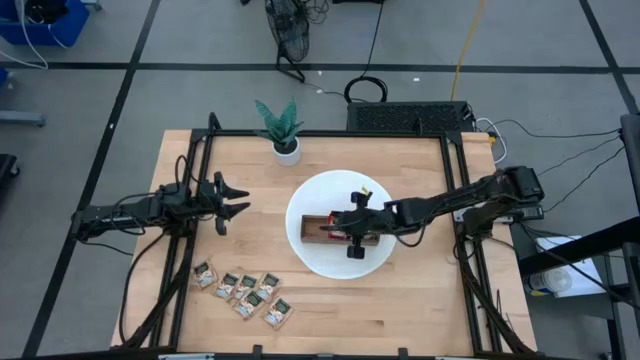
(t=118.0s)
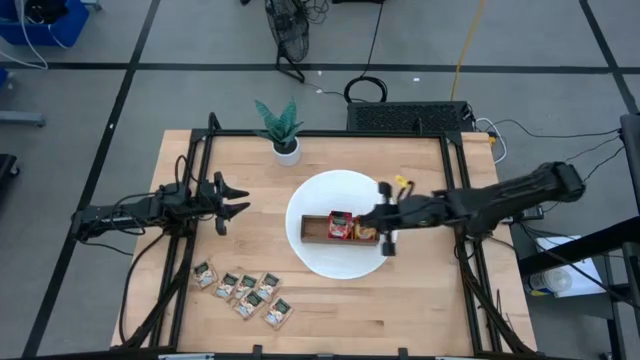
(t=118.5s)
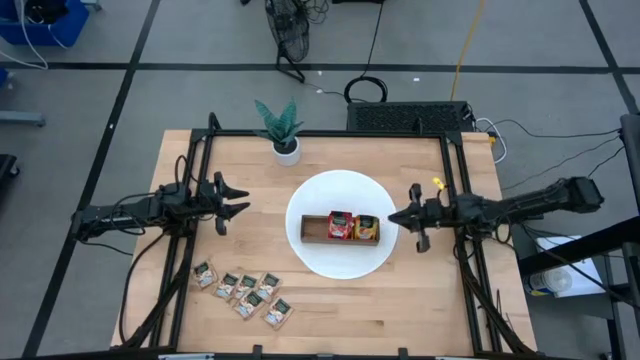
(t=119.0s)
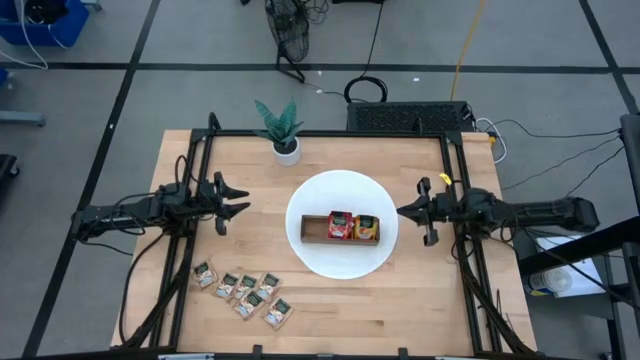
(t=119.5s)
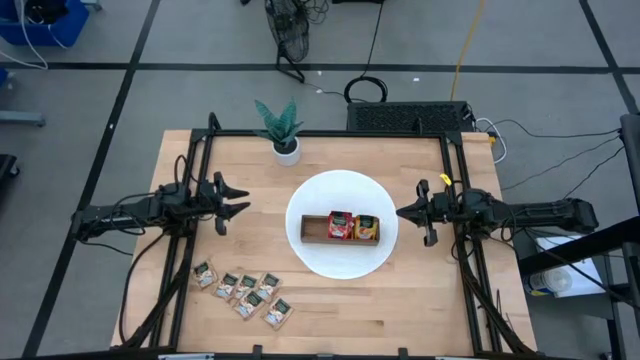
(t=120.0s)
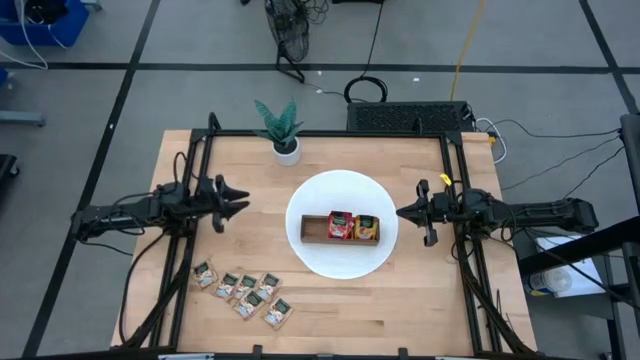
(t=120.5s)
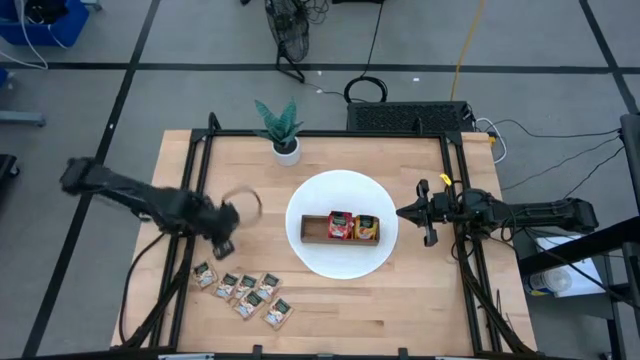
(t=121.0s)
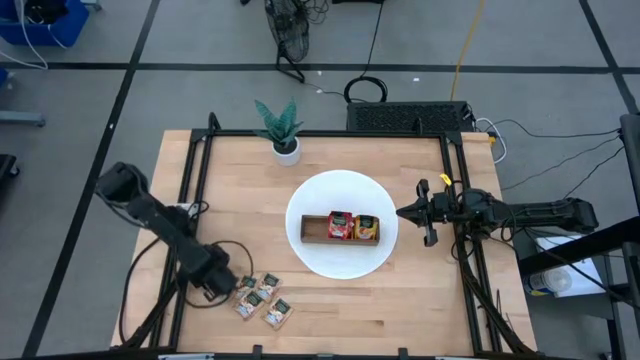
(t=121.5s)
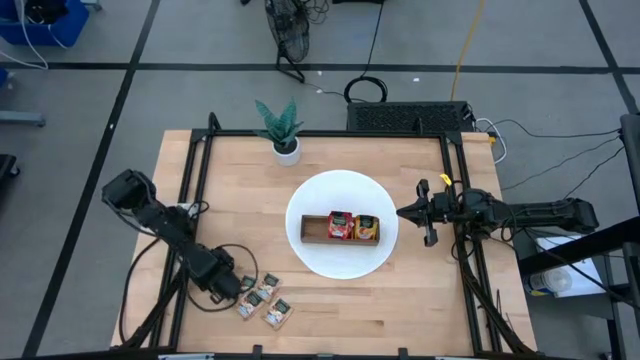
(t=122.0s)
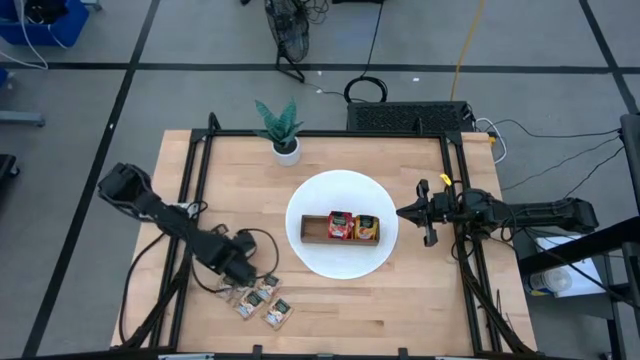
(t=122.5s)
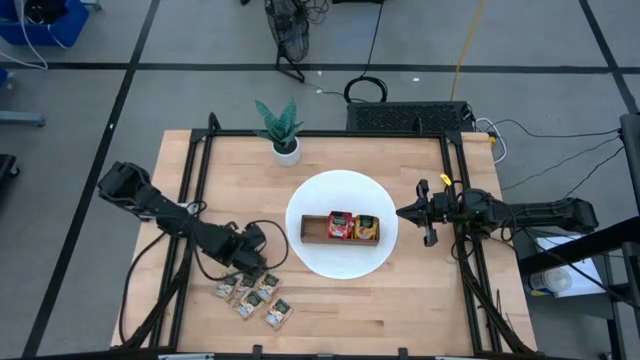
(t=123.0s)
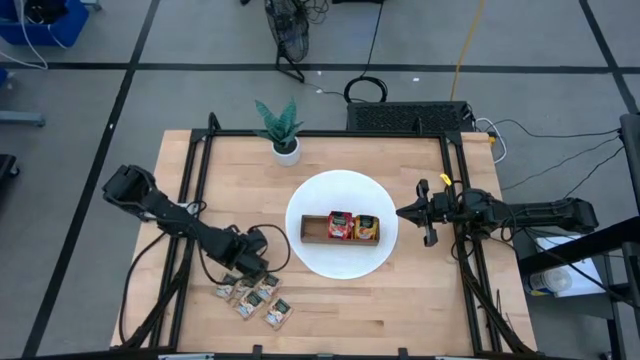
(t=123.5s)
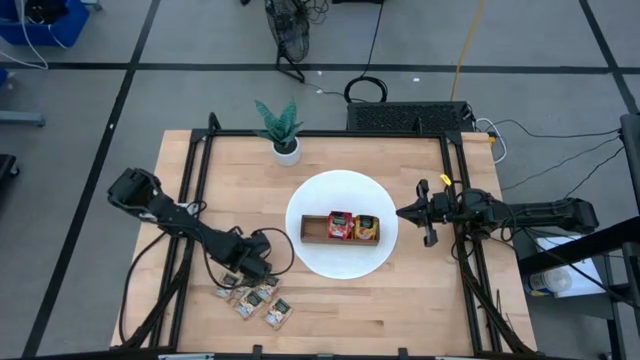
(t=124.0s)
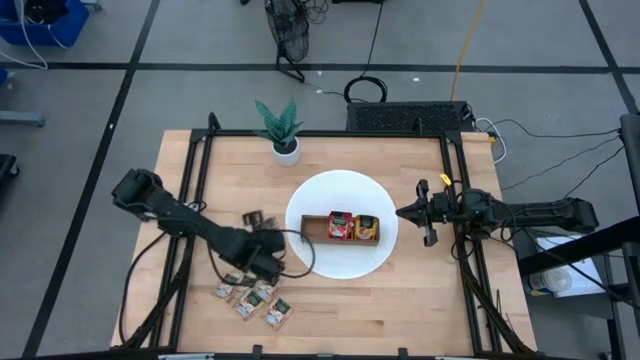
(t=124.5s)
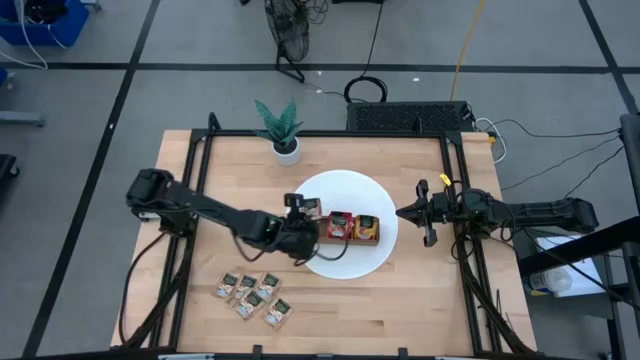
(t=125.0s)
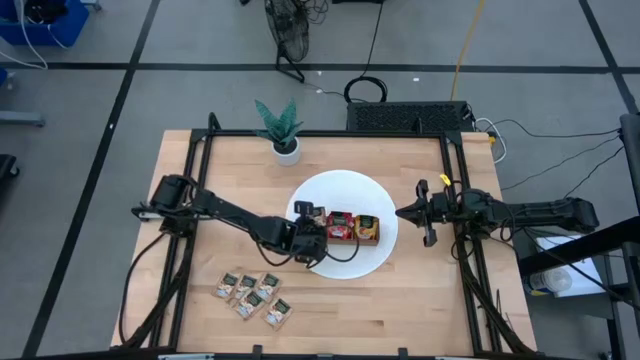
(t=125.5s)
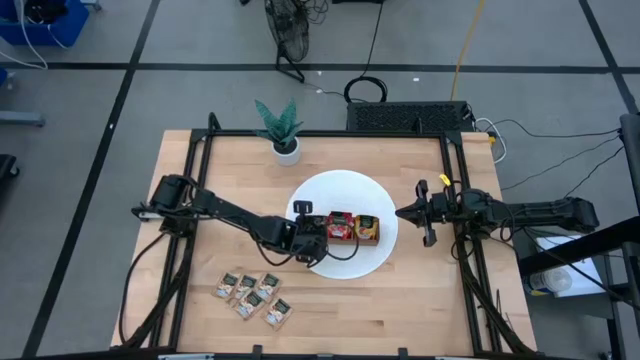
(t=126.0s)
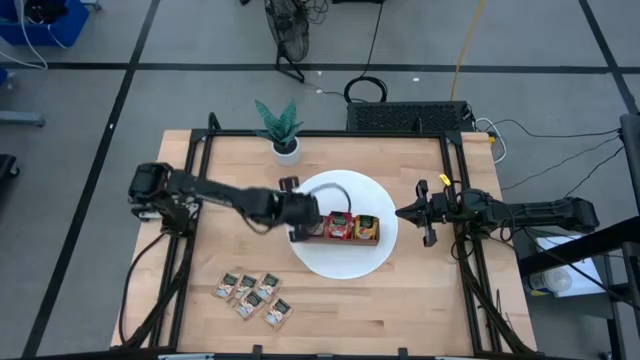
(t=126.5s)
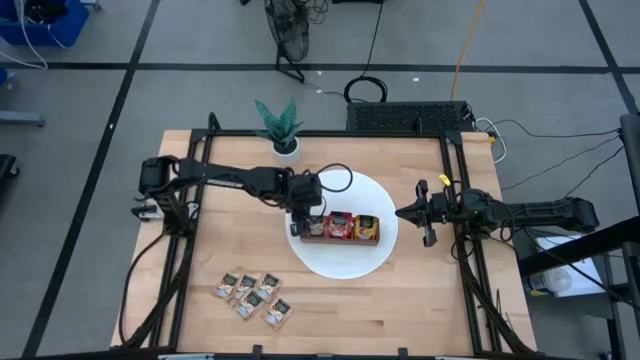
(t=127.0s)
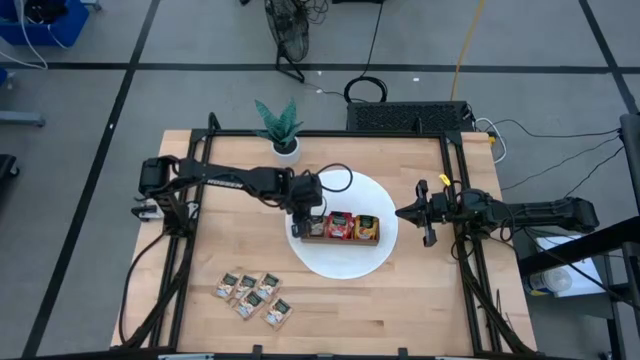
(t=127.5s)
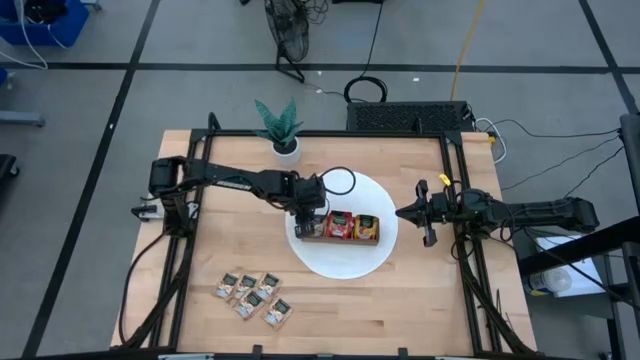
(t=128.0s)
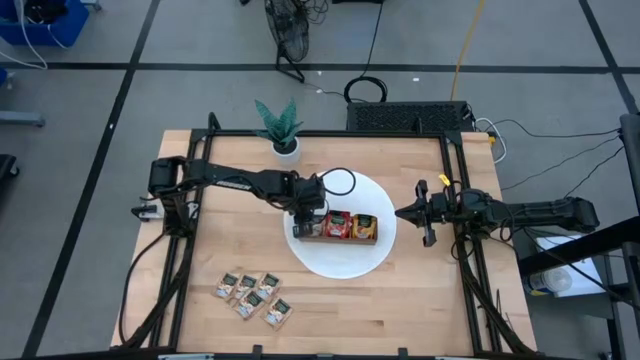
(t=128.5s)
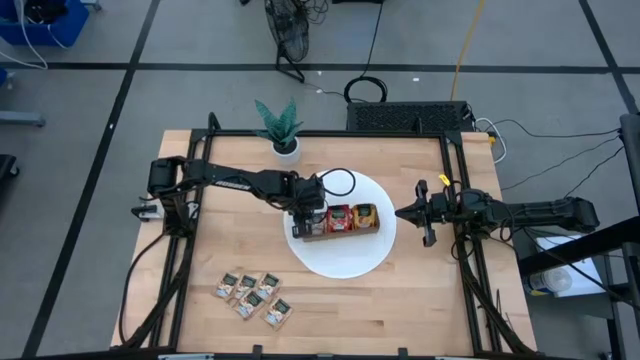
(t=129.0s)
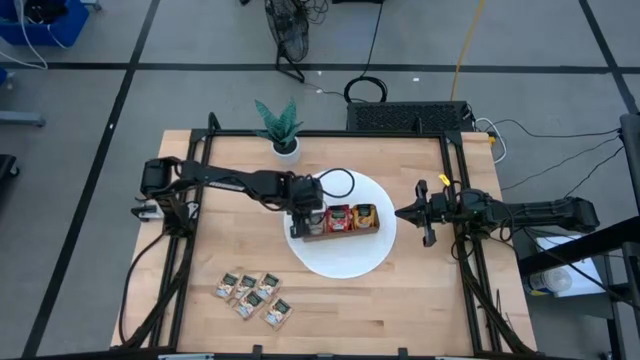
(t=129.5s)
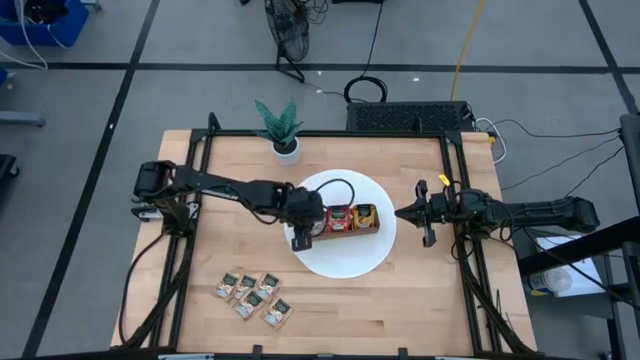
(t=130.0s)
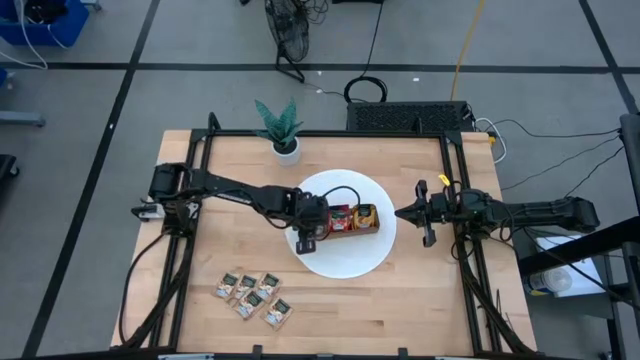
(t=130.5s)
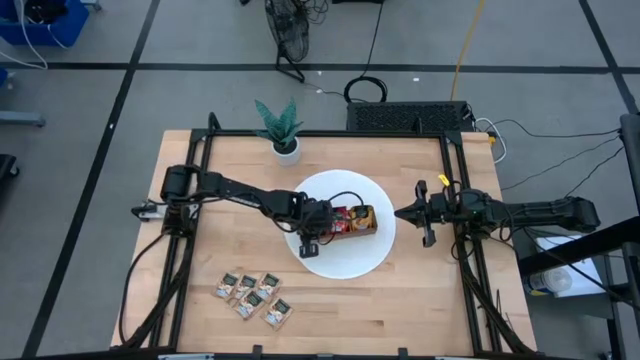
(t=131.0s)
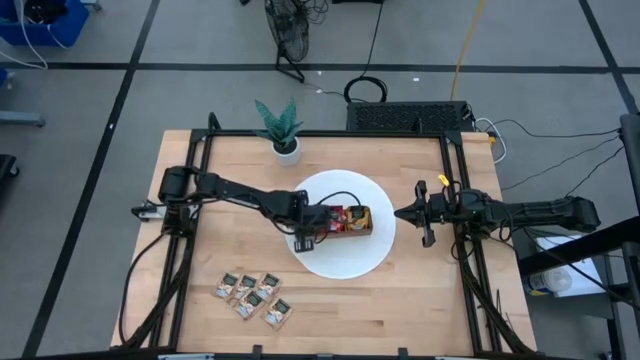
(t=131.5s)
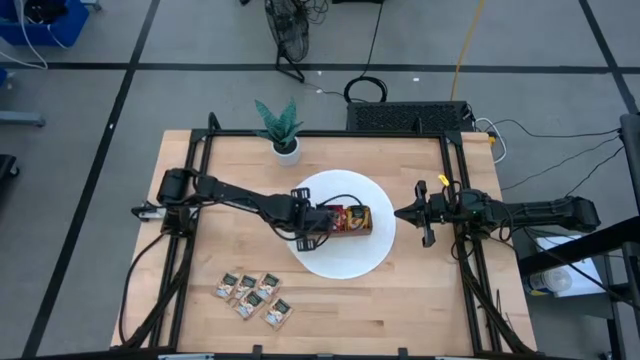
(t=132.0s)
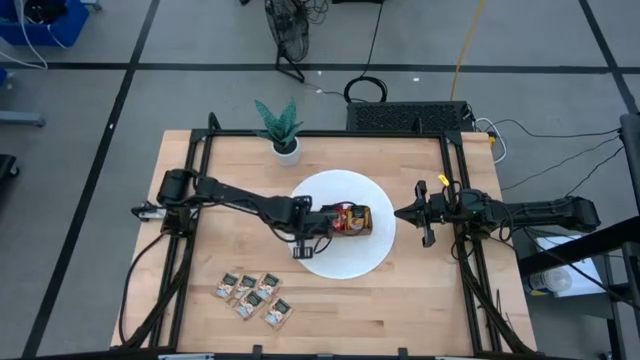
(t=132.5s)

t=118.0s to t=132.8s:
Task: Pick & Place Tea
Put the brown tea bag into the left section of the wooden organizer
